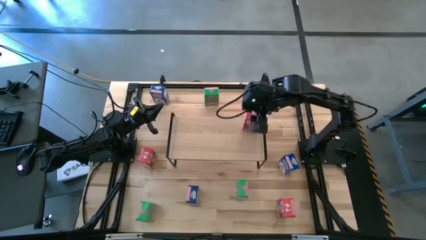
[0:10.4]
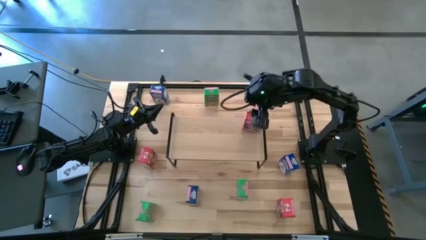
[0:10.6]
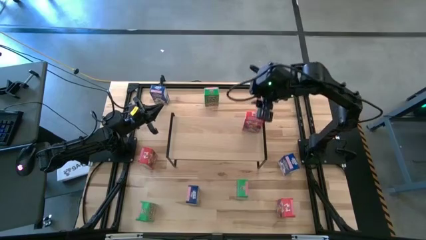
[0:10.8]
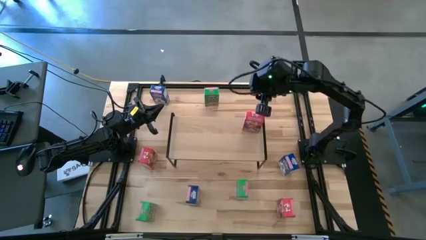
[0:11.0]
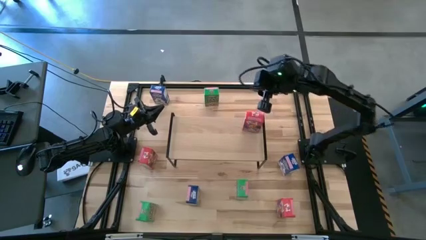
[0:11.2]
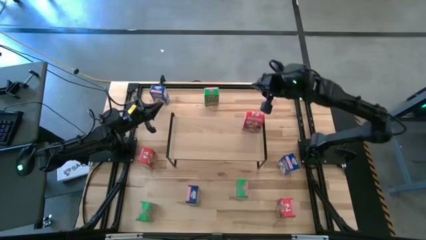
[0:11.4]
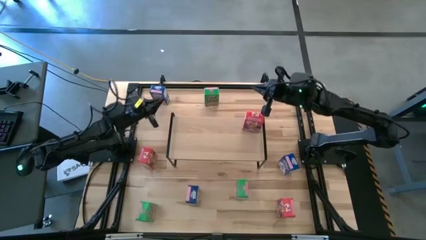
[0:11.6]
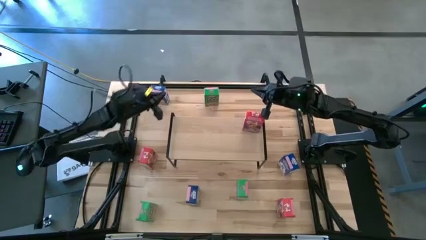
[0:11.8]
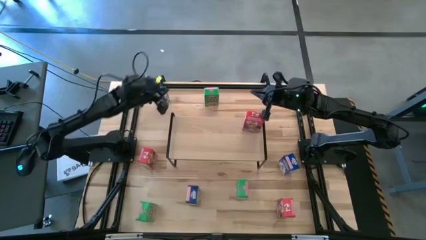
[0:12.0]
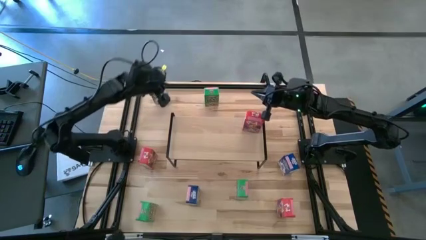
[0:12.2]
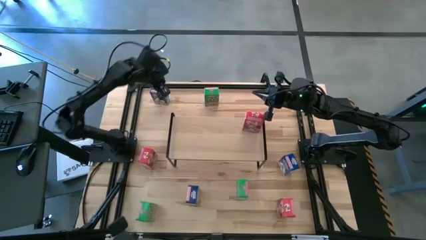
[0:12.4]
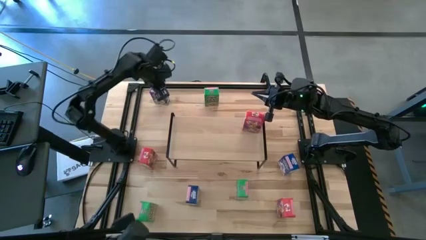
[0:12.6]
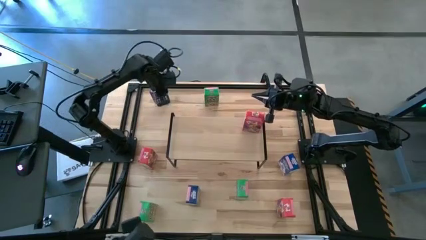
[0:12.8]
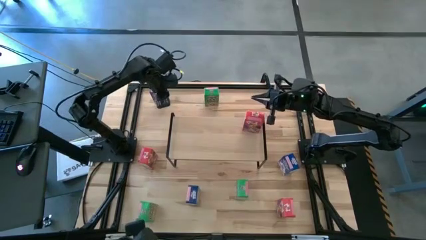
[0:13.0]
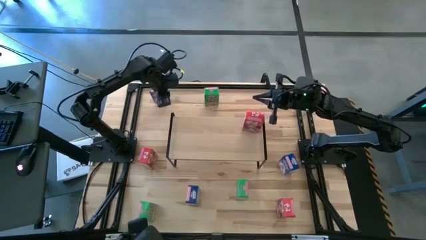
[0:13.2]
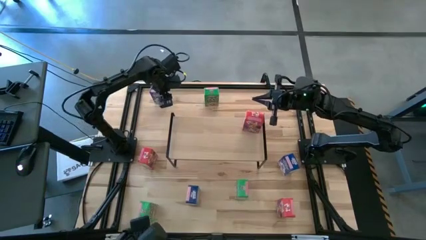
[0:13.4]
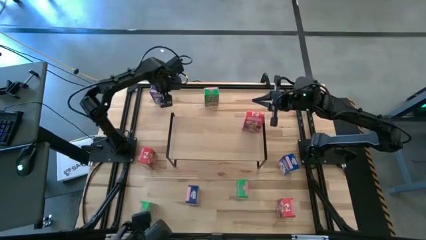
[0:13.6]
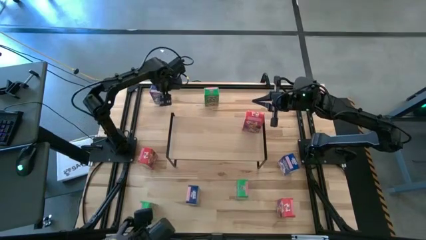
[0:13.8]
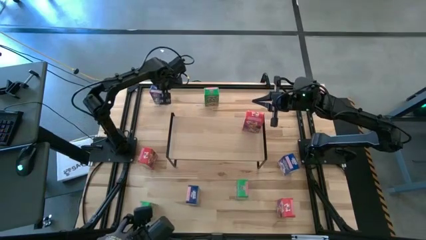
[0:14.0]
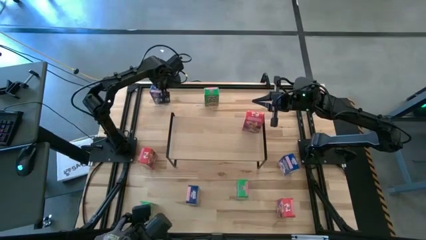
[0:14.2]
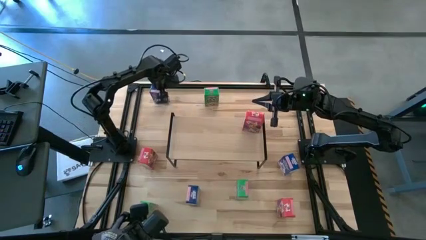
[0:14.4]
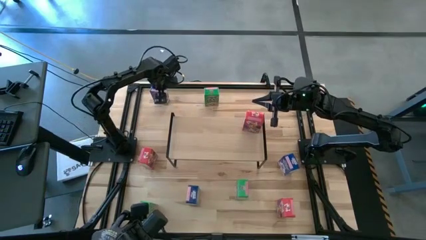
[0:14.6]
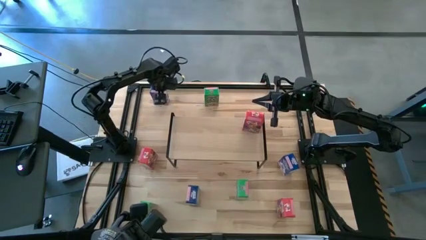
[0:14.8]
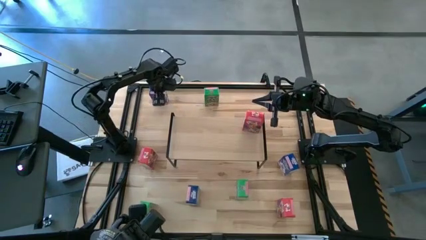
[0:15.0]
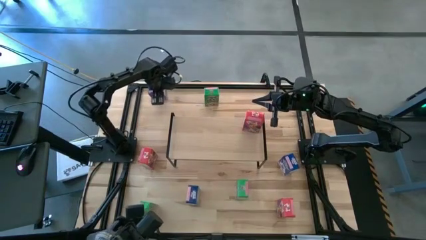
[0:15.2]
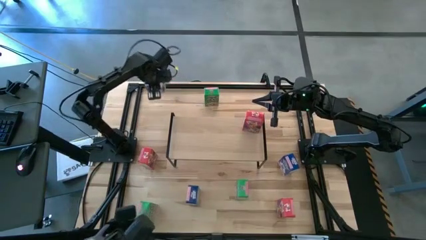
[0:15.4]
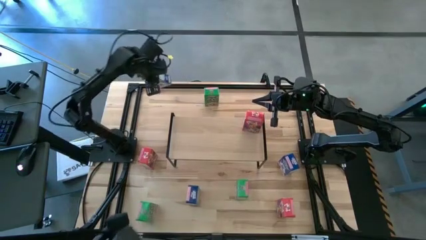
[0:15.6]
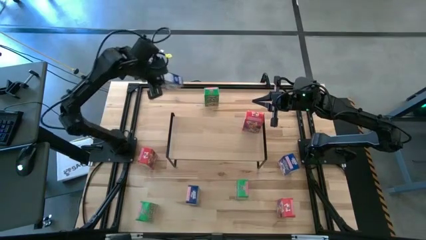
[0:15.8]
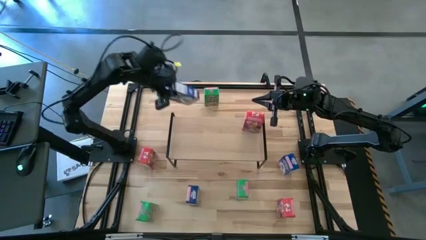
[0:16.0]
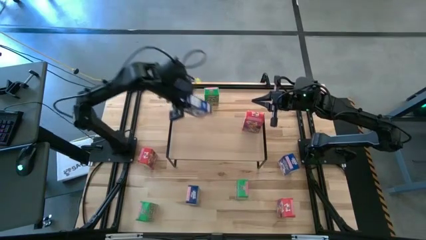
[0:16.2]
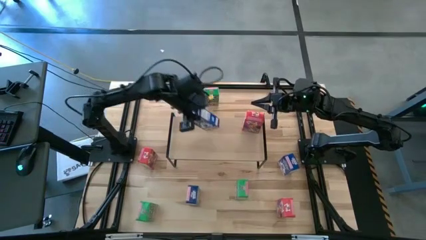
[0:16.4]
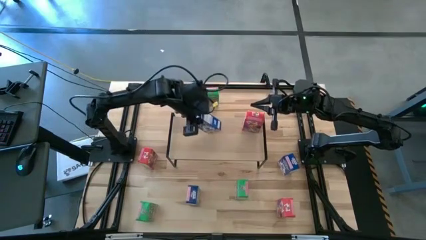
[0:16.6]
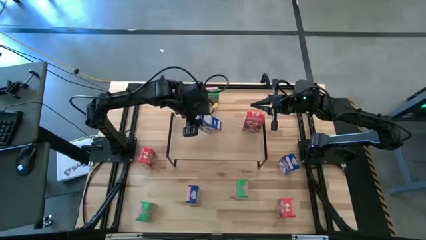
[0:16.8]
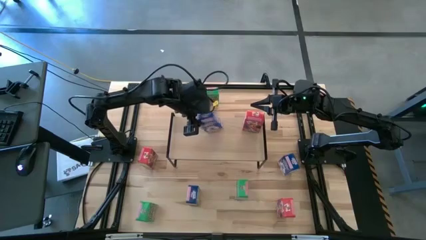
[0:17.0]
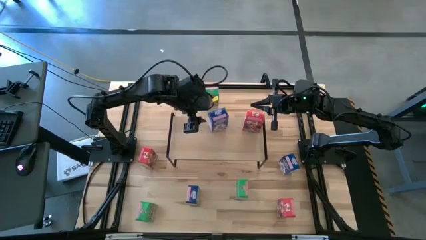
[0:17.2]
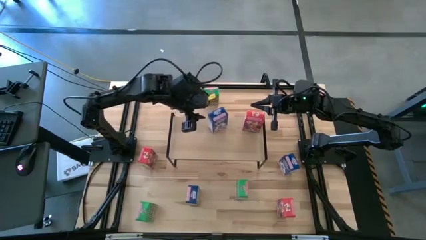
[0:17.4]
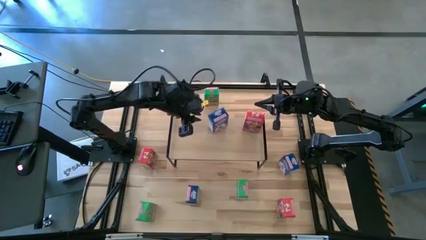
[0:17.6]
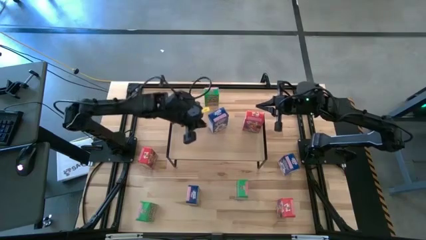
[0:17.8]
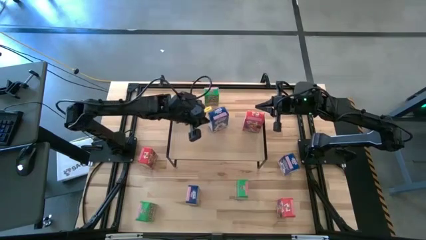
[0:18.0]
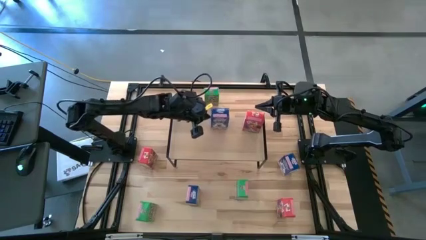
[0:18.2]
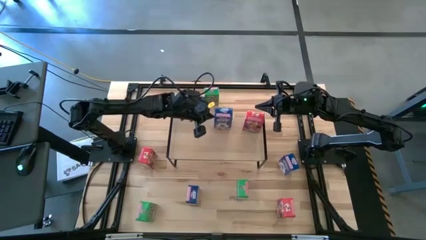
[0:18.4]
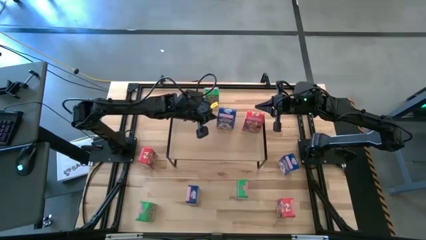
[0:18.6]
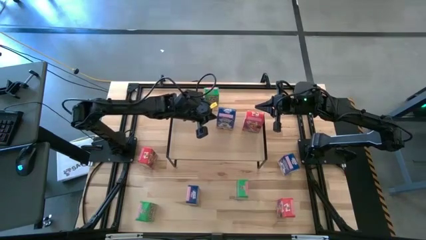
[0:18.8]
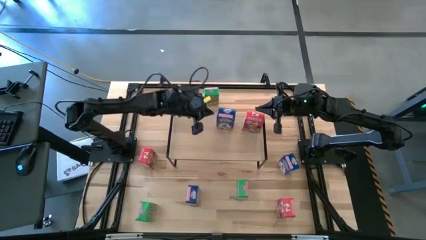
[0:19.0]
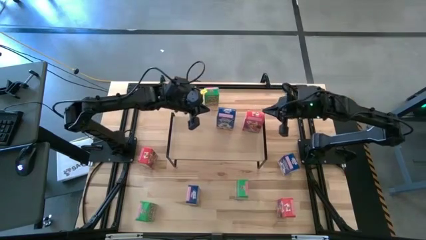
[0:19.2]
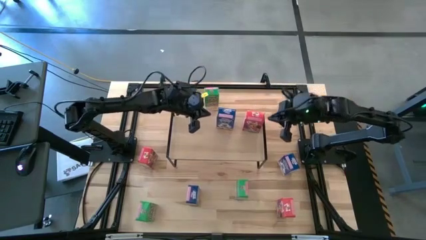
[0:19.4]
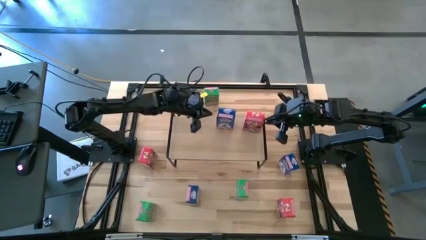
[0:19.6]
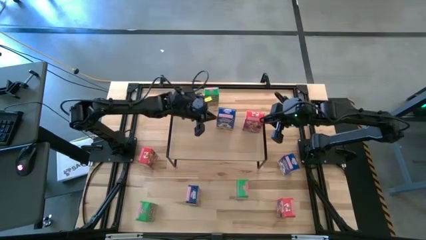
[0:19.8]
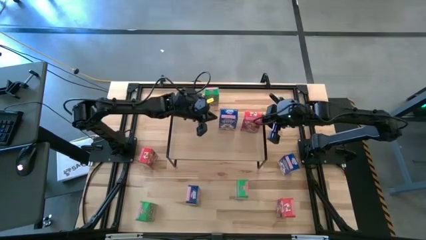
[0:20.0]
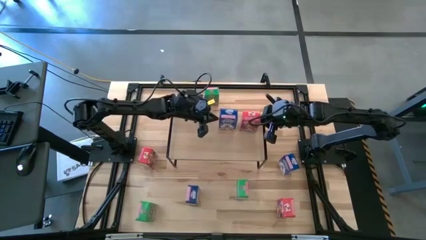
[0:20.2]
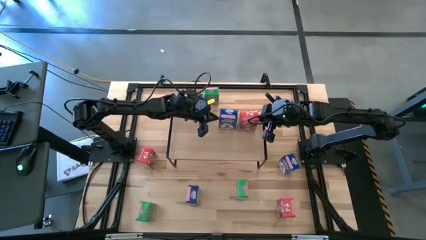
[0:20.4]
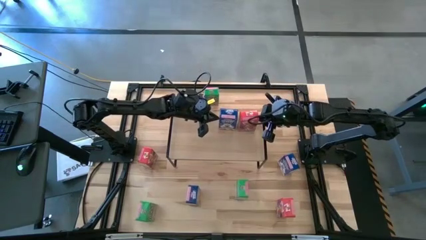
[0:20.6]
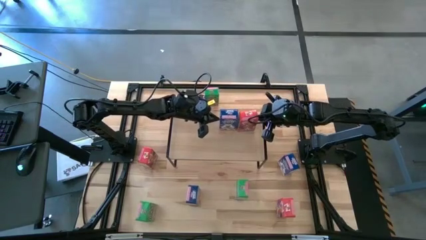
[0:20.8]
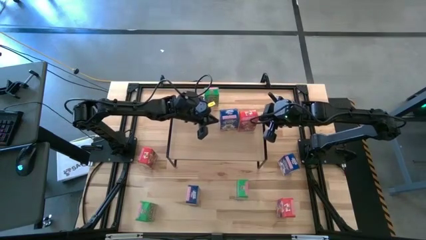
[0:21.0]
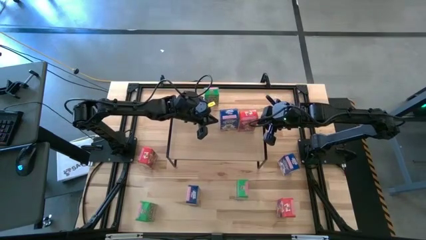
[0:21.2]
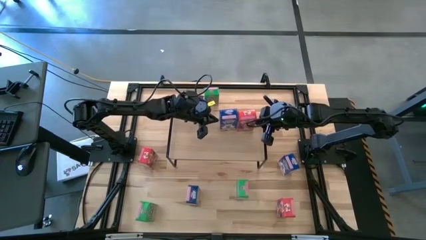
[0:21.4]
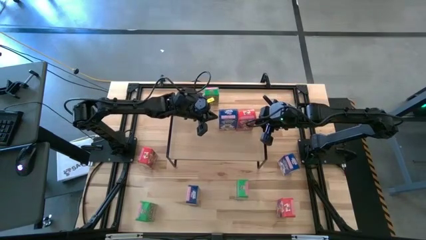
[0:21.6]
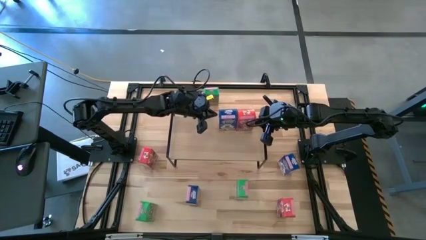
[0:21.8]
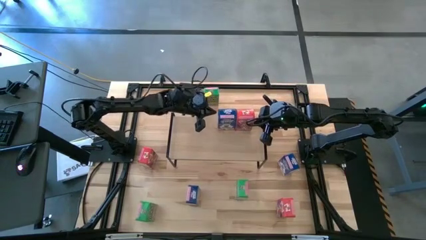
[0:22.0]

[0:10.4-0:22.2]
Task: Stack cereal on shelf
Put the top blue cereal box on the shelf

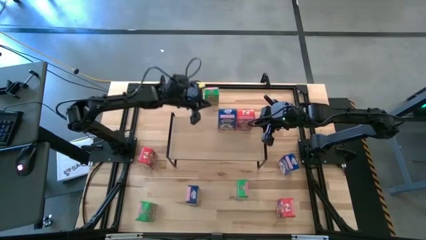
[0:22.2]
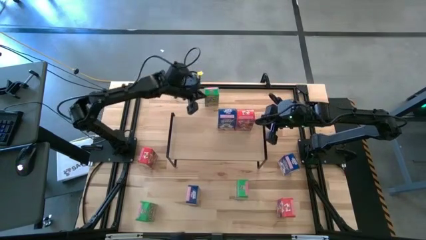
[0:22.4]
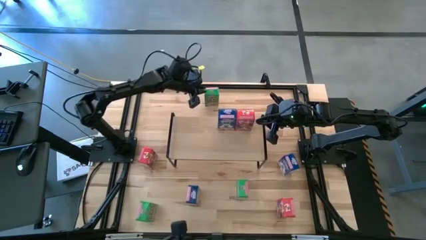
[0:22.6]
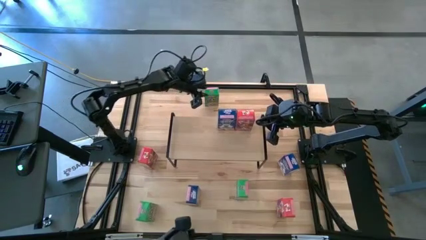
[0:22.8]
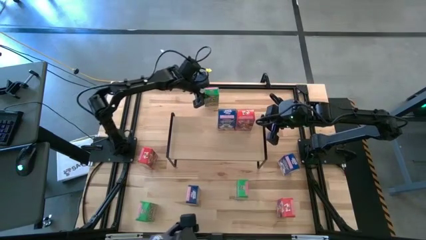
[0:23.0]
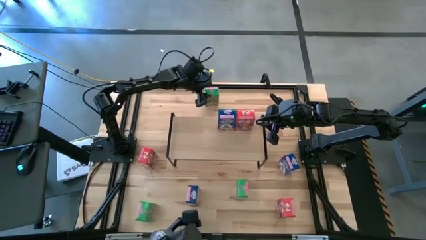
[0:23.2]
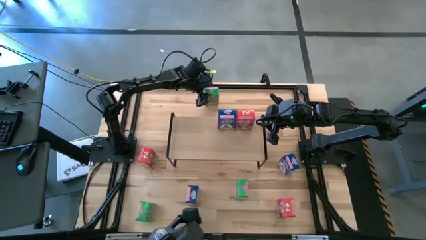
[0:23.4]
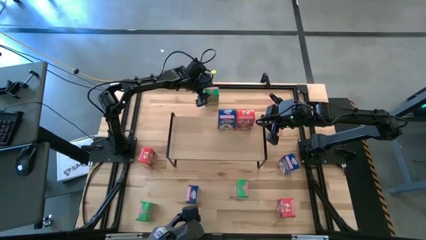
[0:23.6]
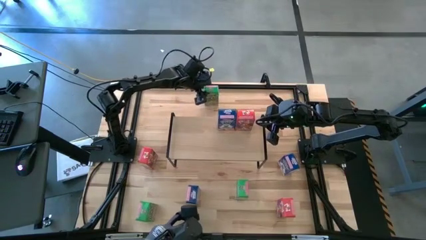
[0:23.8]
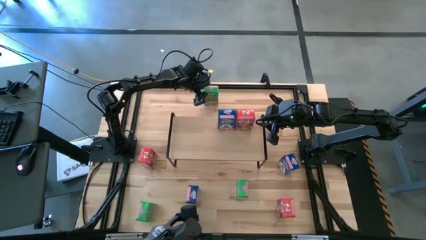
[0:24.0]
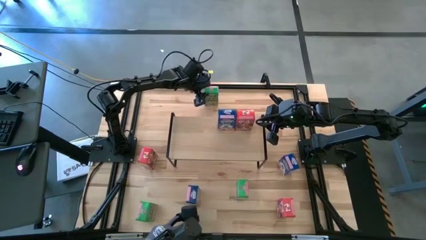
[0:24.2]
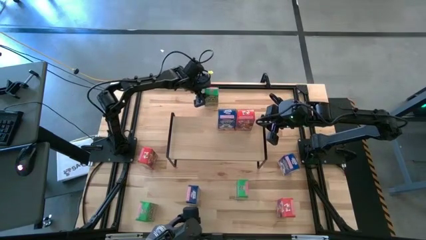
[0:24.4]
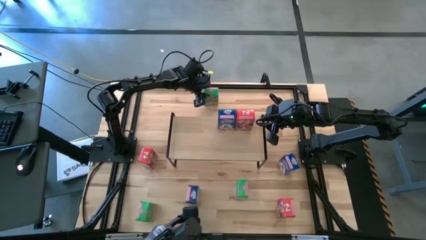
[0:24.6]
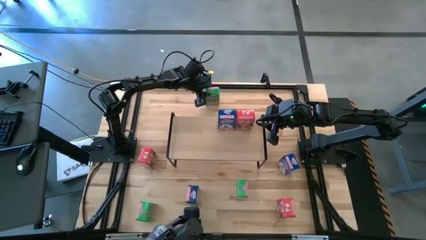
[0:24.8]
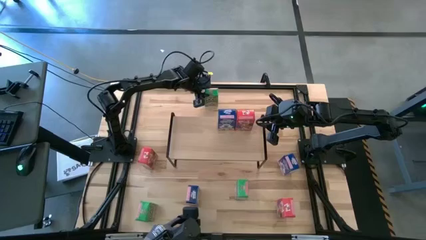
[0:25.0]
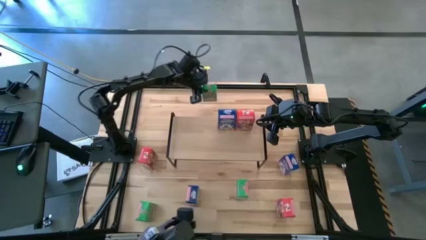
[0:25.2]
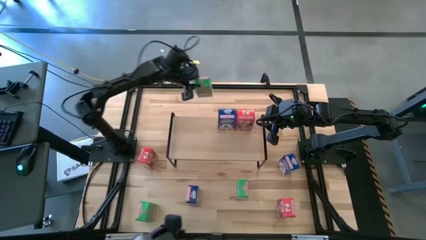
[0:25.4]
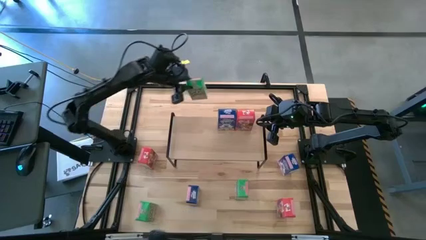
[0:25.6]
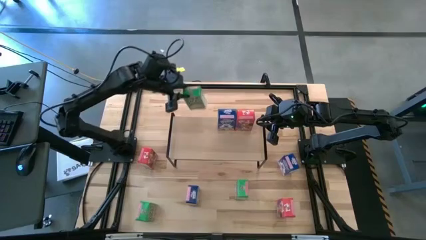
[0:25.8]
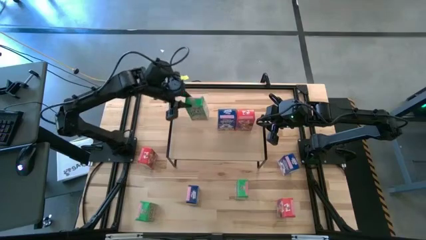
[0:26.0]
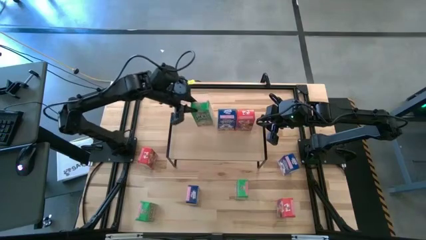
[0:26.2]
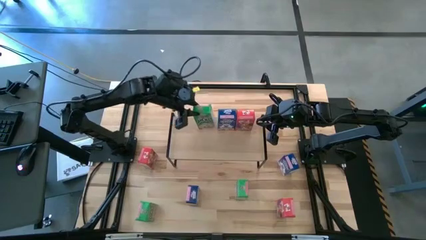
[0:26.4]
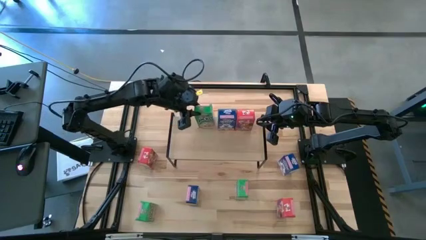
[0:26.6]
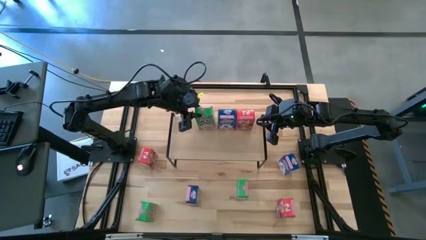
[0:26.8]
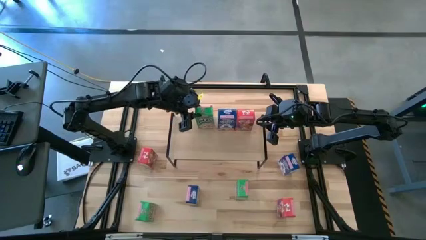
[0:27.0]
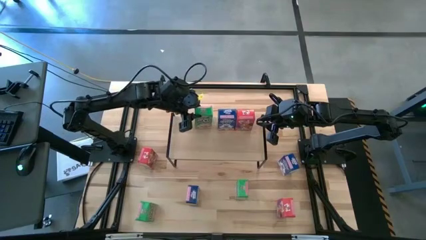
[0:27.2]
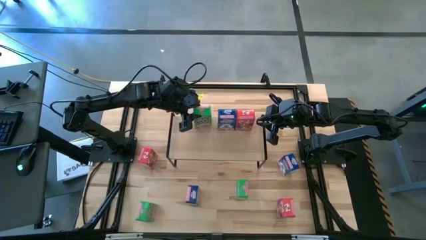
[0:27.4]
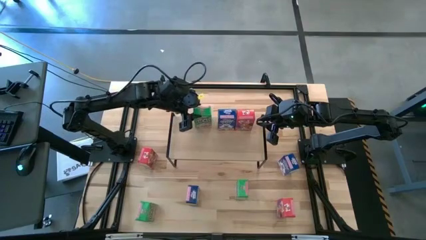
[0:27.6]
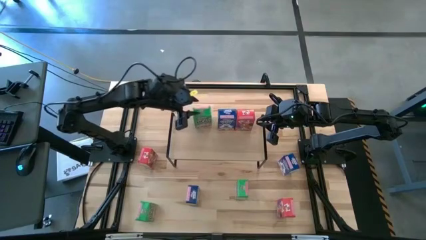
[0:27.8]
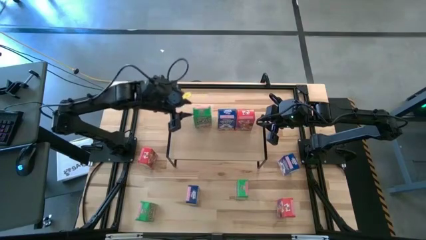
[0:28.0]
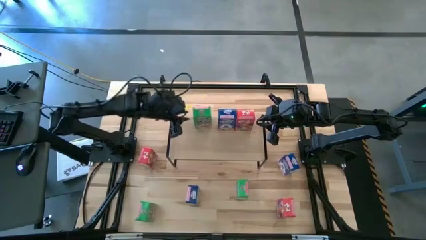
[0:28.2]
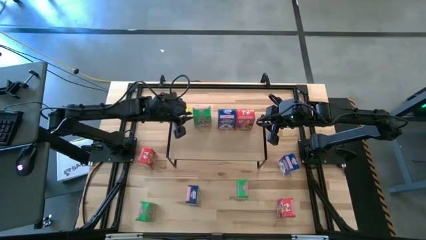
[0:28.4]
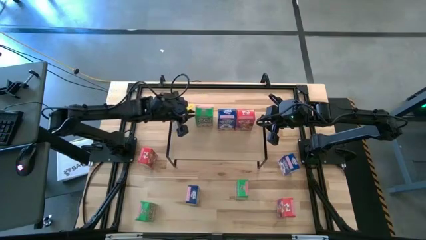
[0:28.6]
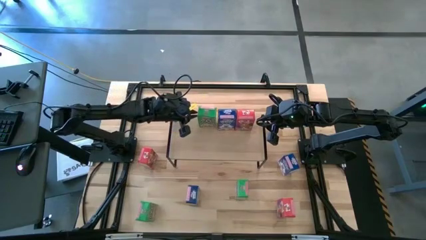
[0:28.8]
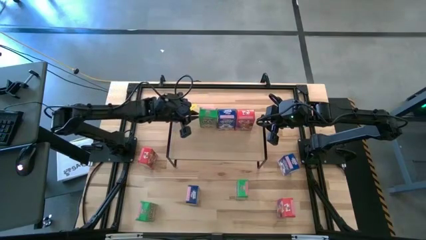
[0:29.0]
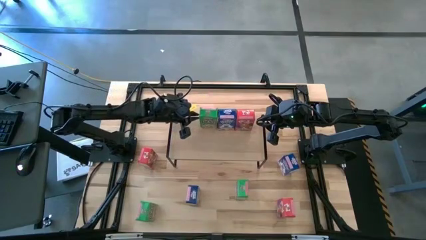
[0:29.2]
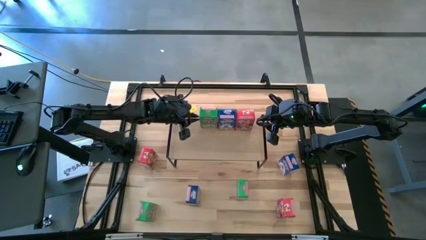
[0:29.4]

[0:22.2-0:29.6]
Put the top green box cereal on the shelf
